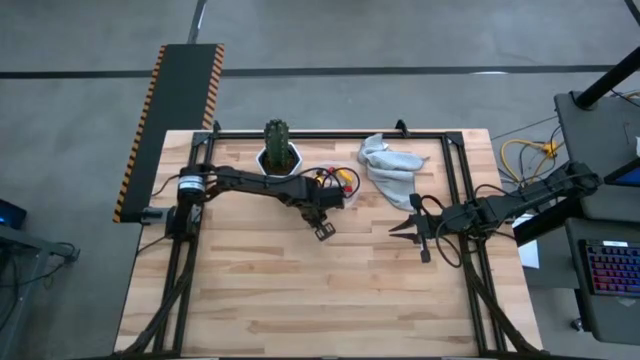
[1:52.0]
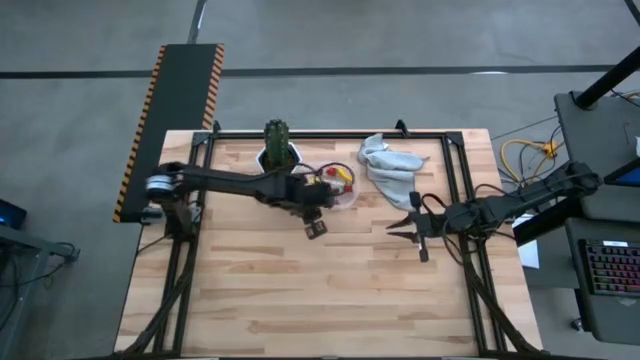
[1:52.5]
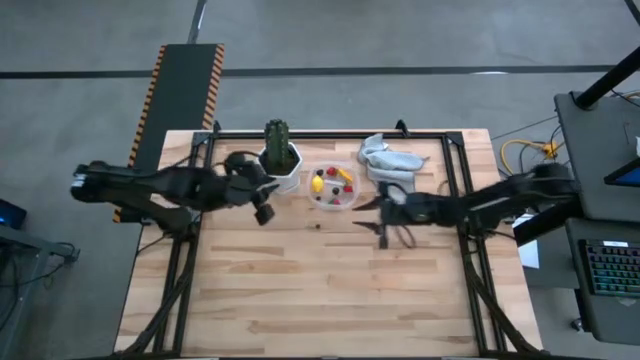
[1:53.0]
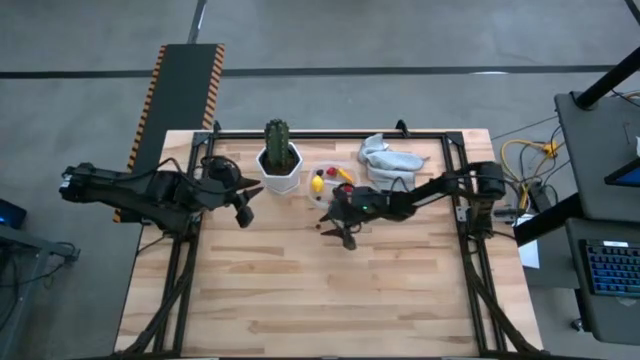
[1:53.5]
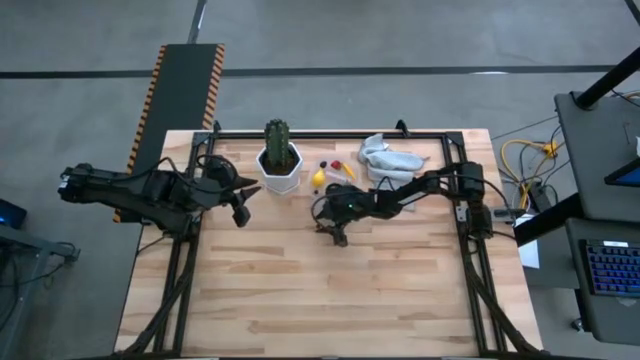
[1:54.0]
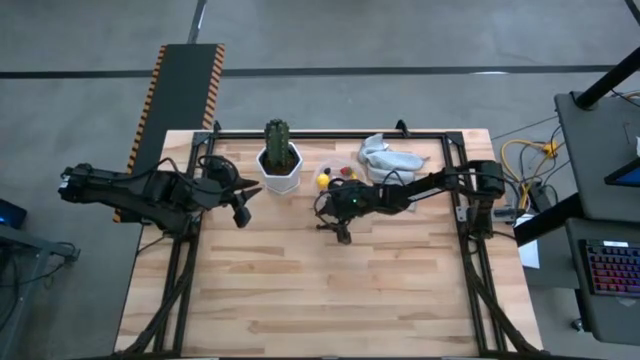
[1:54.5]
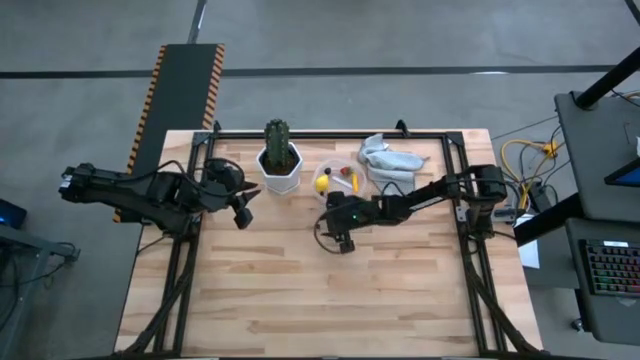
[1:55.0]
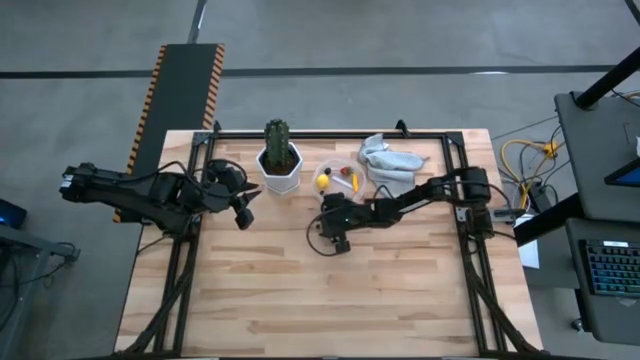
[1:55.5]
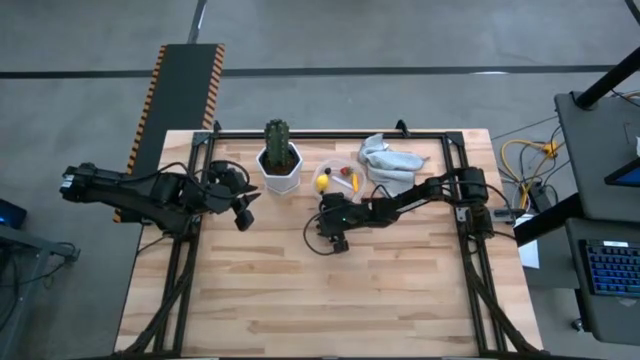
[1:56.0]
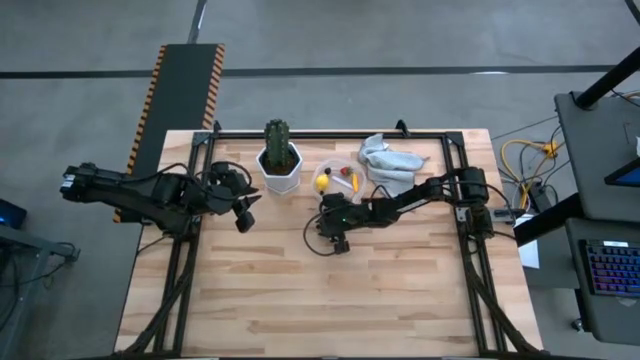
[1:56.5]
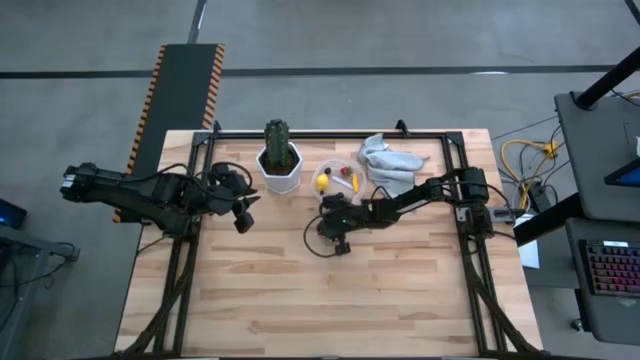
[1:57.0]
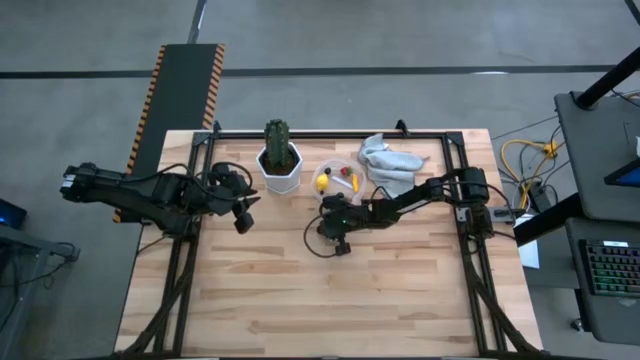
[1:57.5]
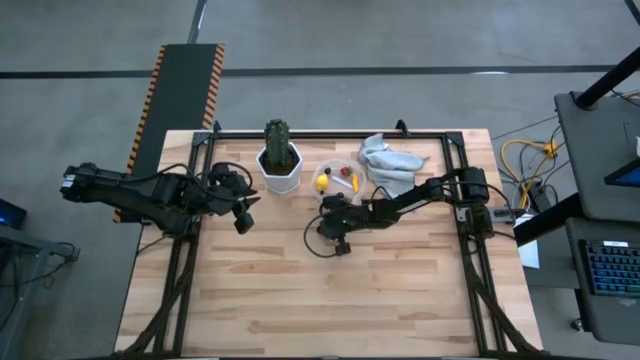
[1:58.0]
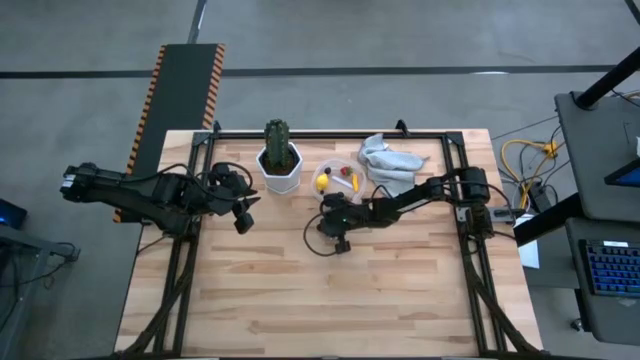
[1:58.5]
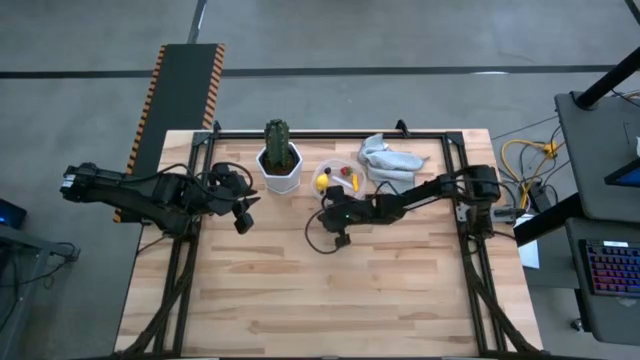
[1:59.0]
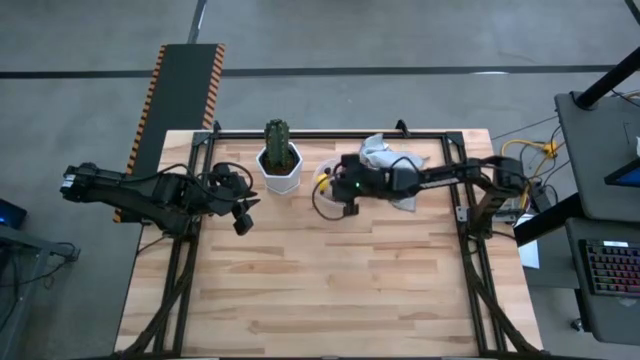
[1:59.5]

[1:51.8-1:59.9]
Task: Pick and placing Produce into tupperware
Put the blueberry into the transparent bin

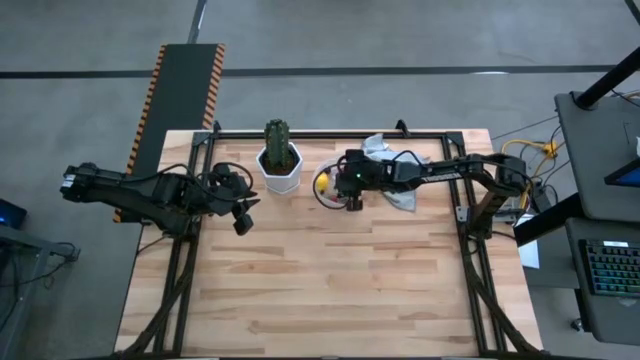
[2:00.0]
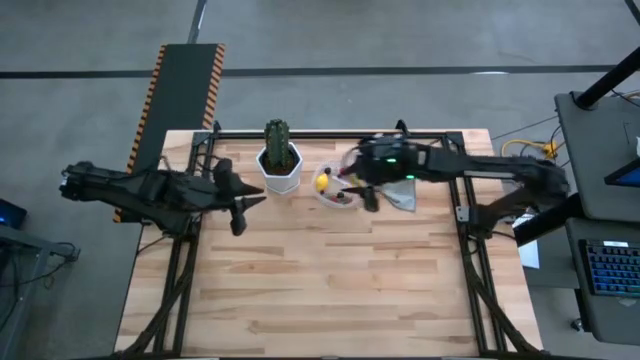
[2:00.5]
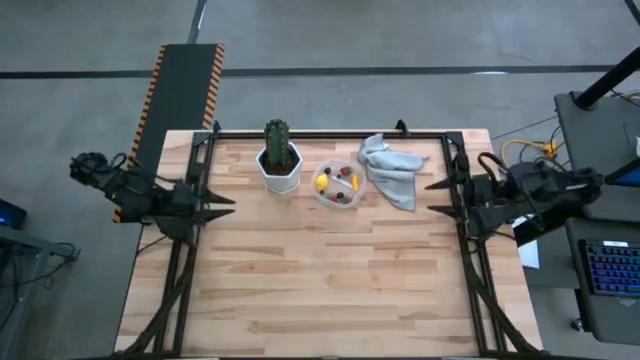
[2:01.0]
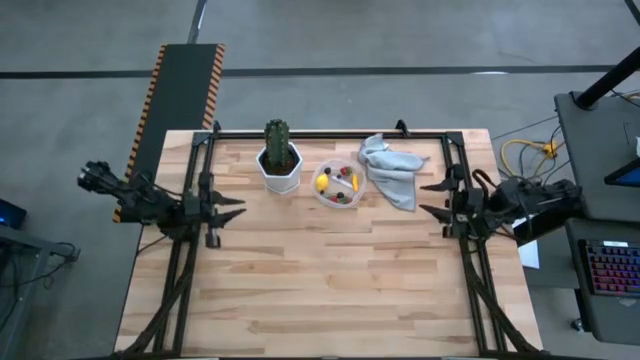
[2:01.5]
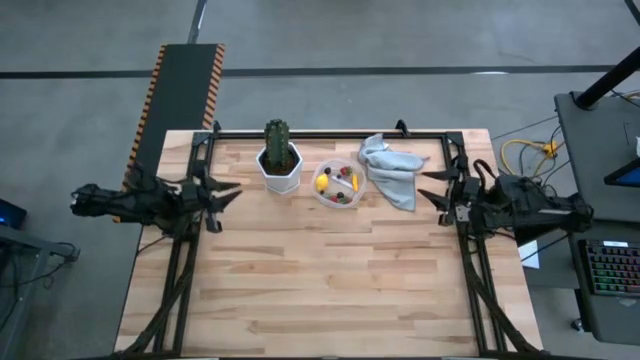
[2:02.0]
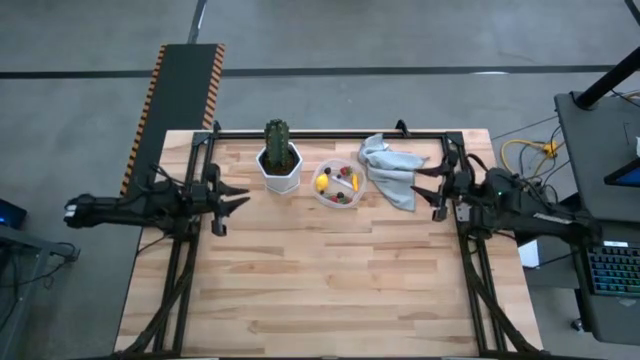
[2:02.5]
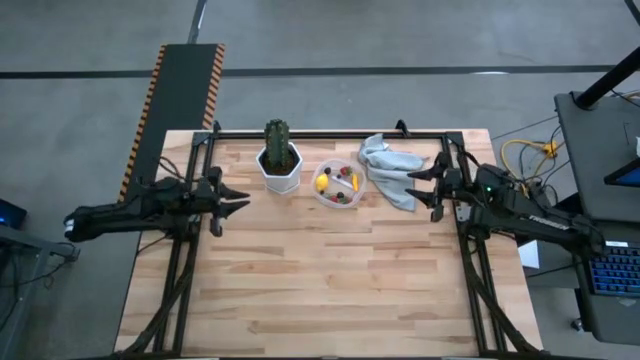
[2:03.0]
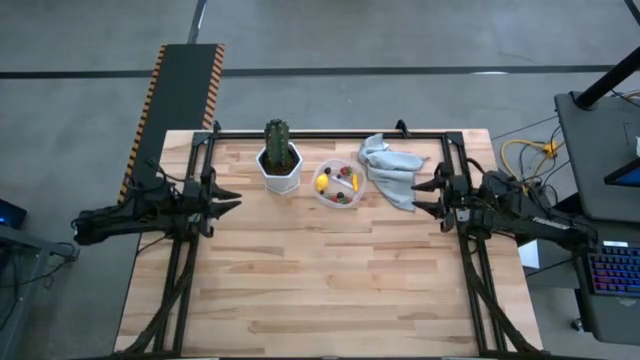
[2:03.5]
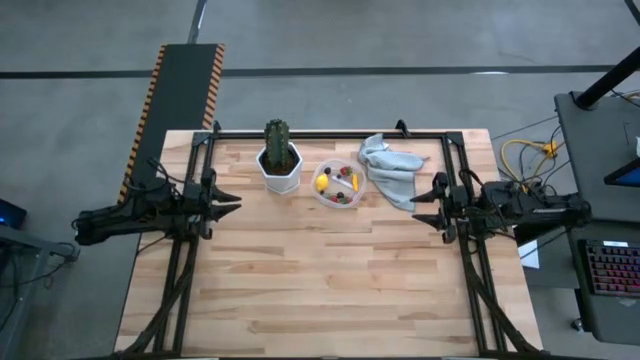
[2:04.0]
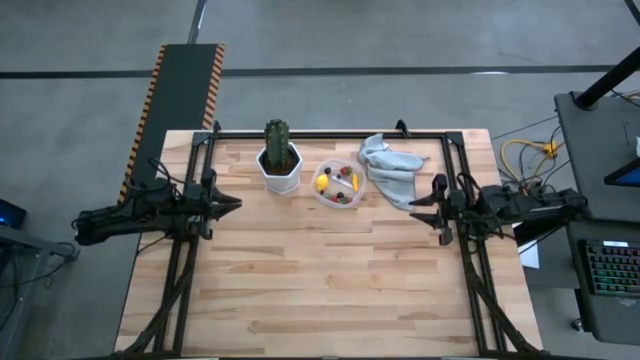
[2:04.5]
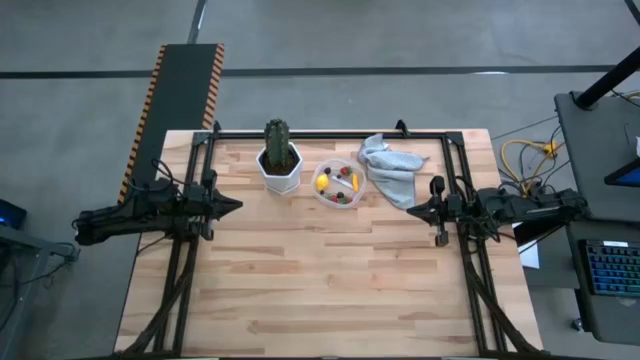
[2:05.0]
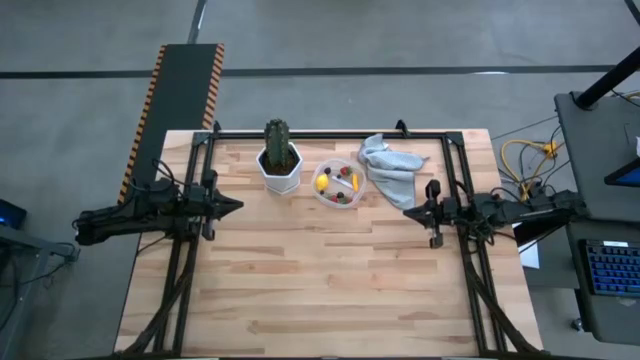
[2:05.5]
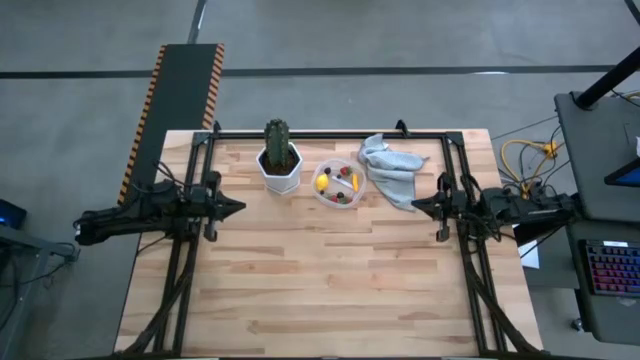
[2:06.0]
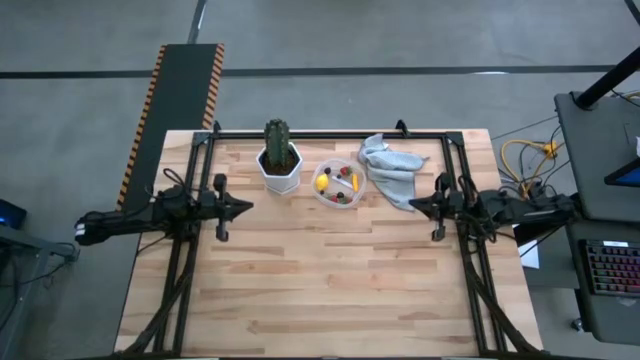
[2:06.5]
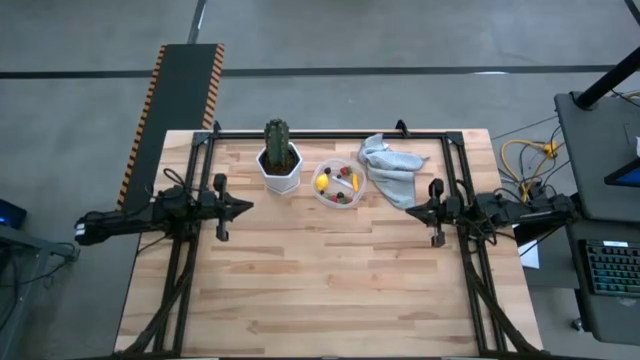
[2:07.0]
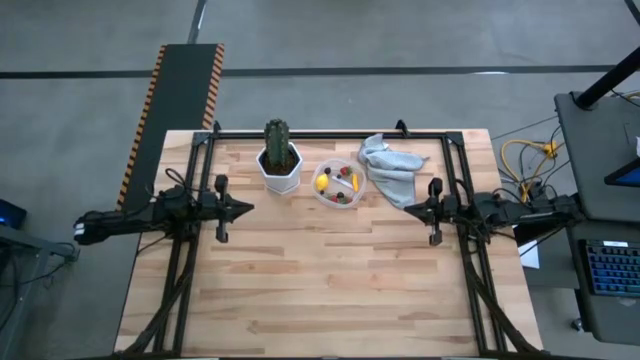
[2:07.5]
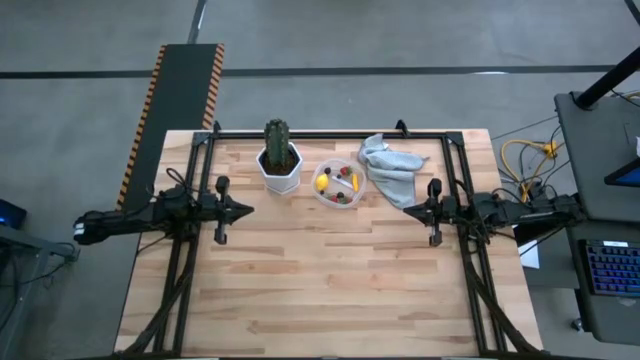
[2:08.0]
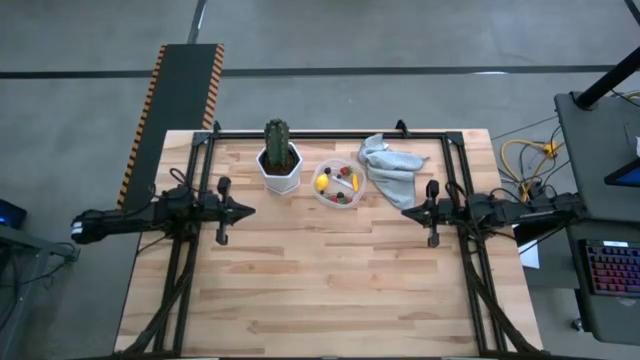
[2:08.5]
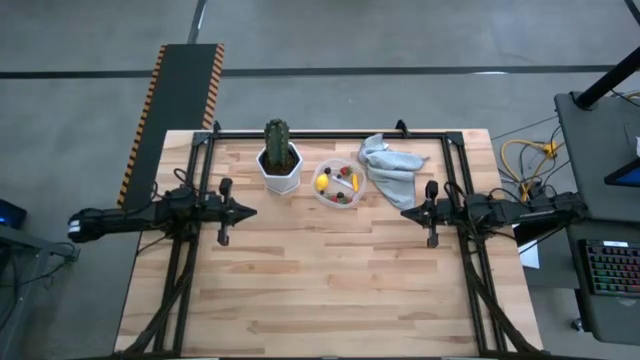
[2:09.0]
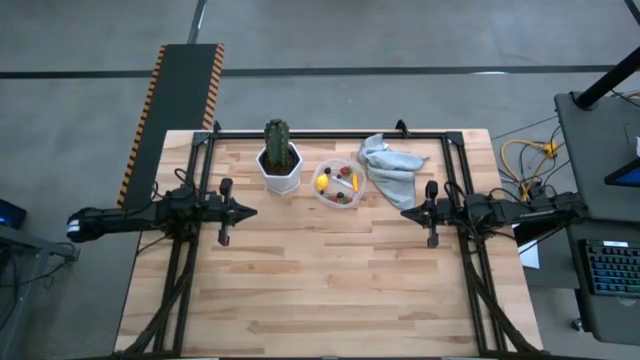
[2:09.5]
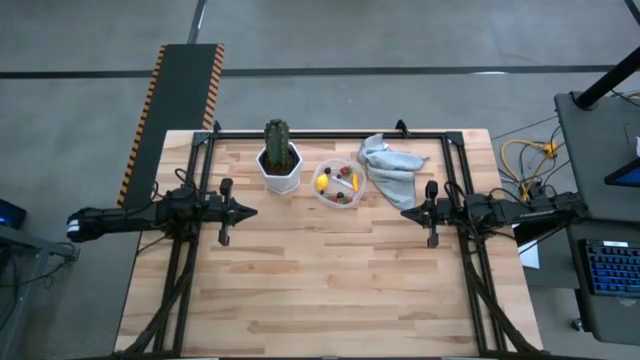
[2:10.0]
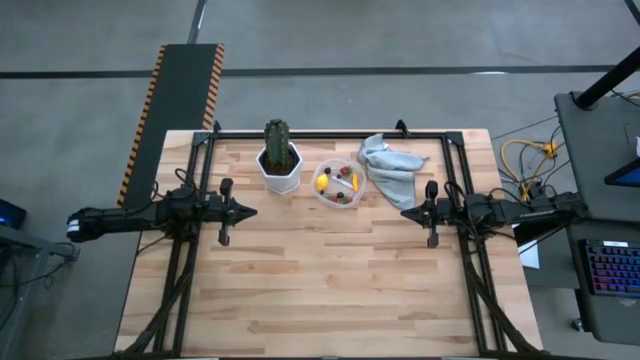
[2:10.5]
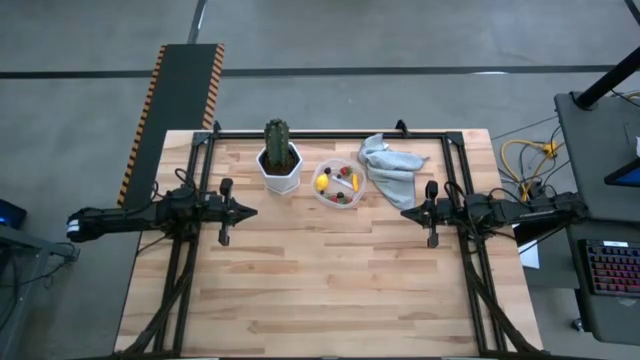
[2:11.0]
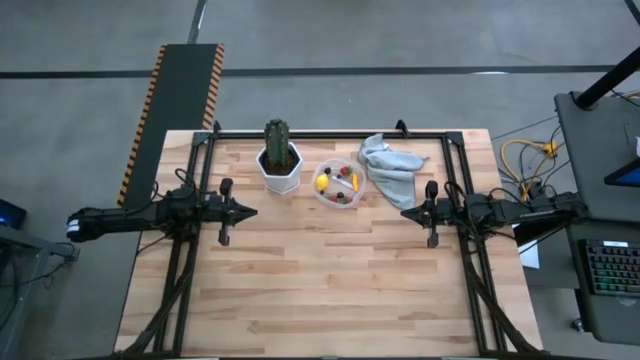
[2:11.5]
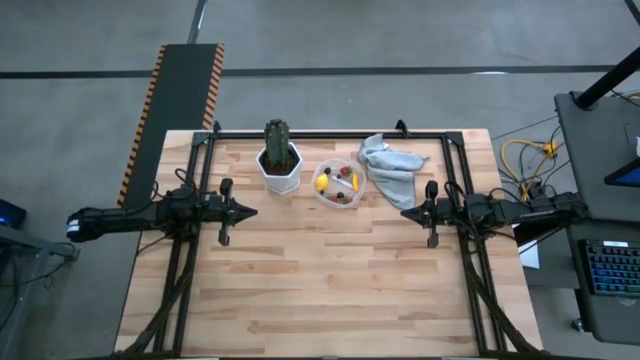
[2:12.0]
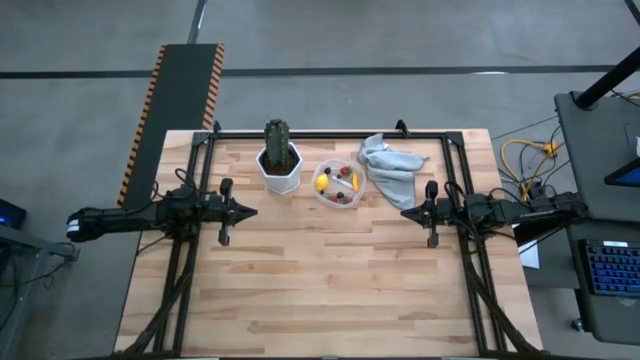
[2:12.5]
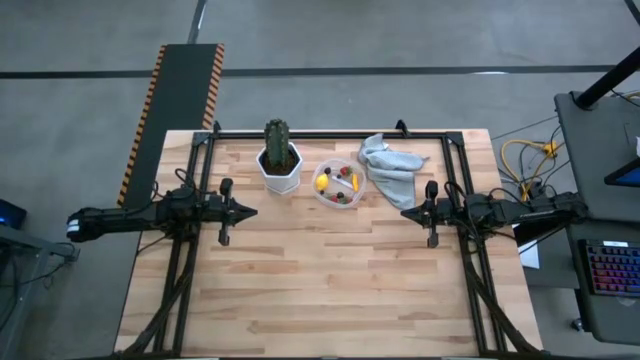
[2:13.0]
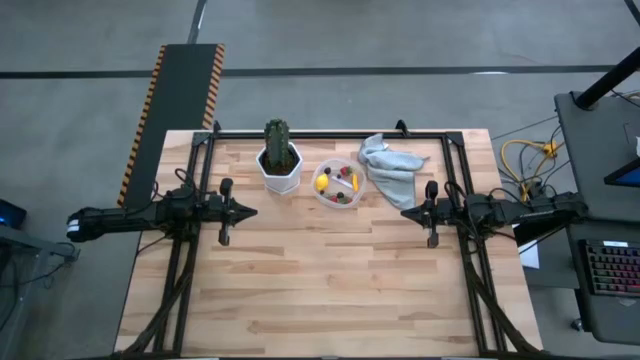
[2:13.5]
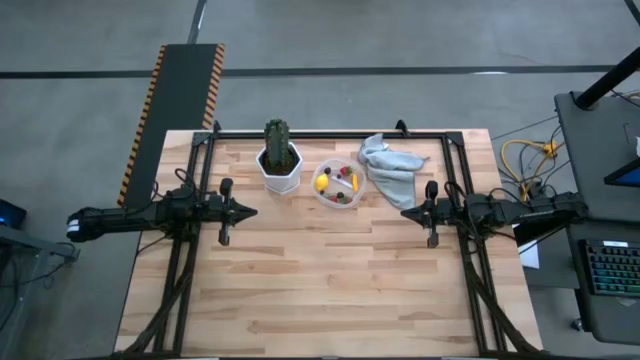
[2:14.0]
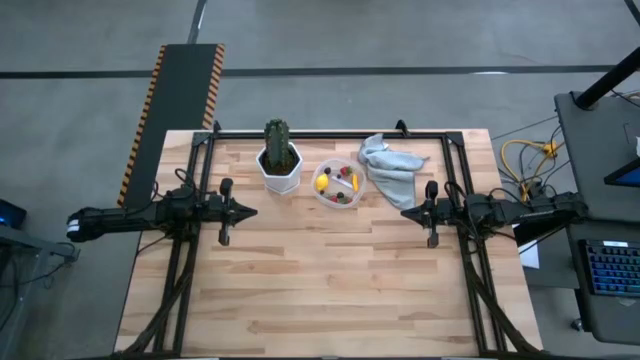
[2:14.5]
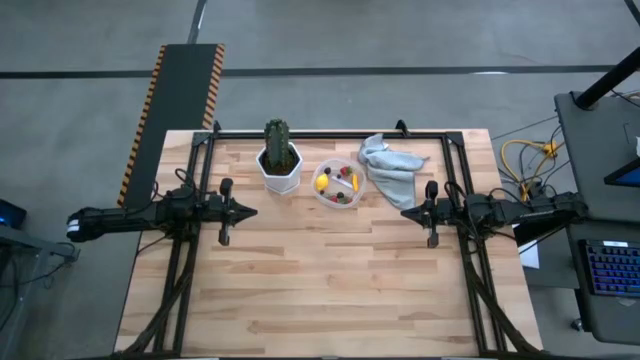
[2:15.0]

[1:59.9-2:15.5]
Return to Home Position
